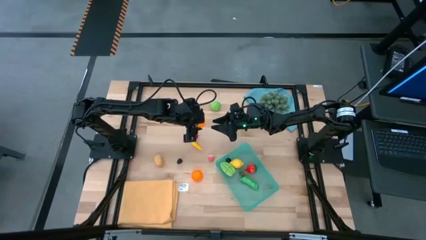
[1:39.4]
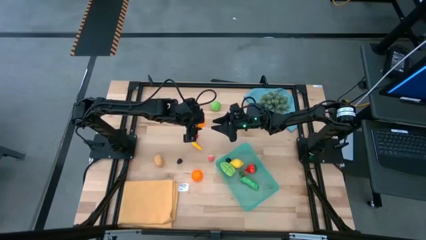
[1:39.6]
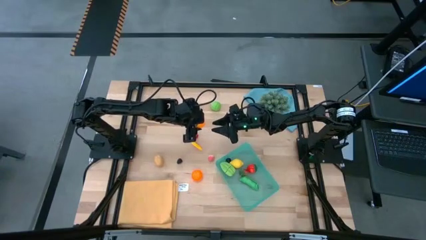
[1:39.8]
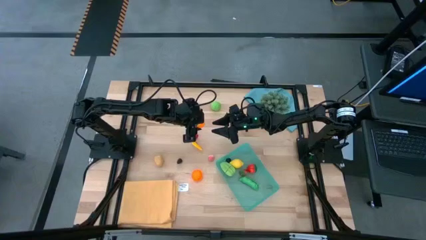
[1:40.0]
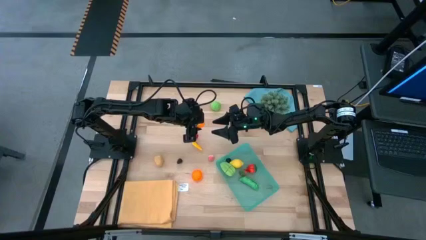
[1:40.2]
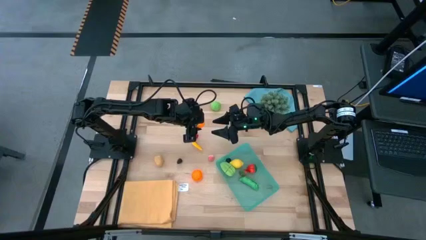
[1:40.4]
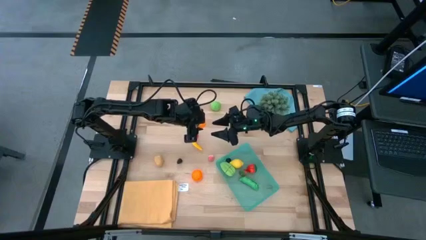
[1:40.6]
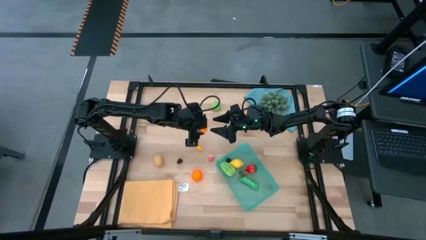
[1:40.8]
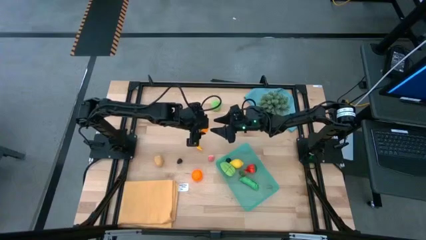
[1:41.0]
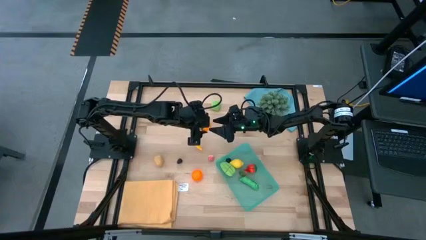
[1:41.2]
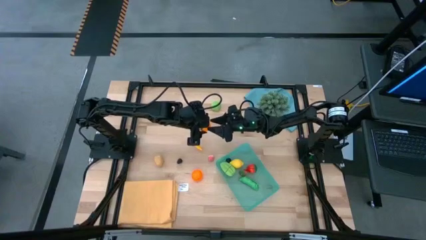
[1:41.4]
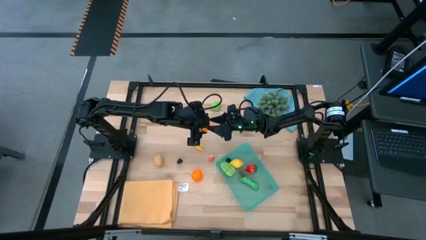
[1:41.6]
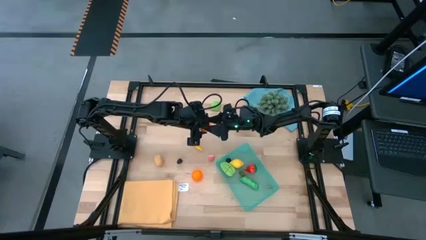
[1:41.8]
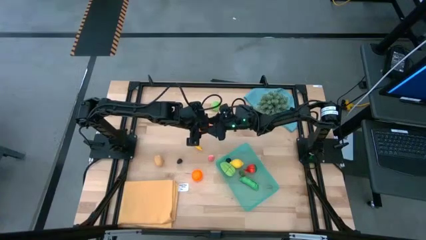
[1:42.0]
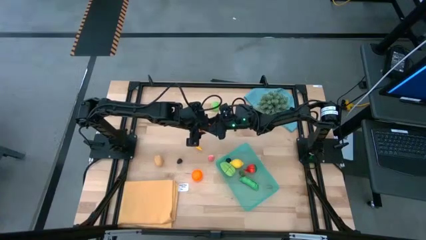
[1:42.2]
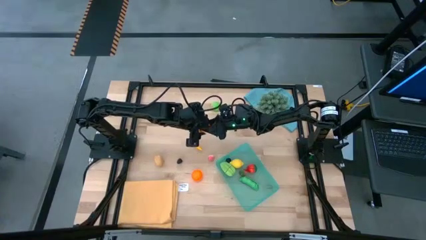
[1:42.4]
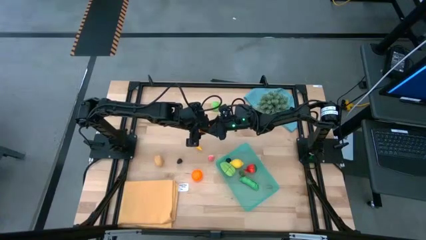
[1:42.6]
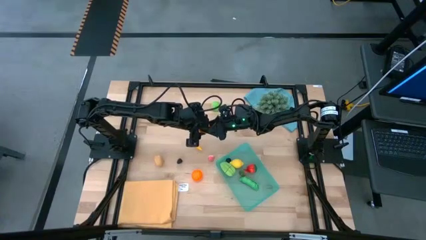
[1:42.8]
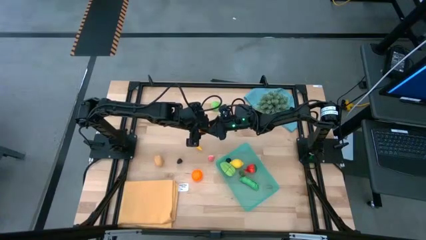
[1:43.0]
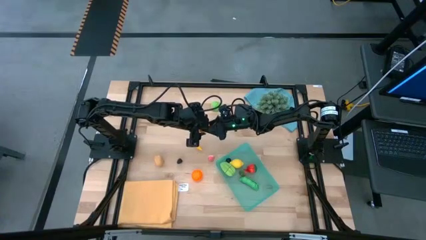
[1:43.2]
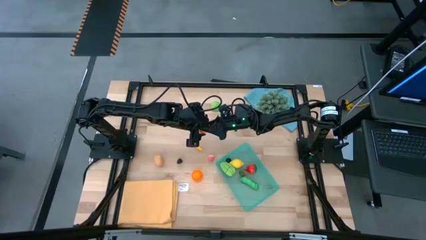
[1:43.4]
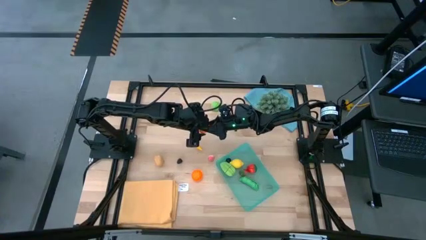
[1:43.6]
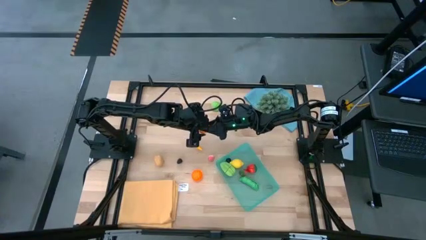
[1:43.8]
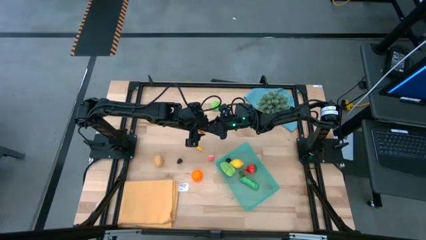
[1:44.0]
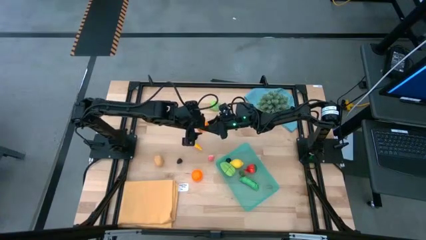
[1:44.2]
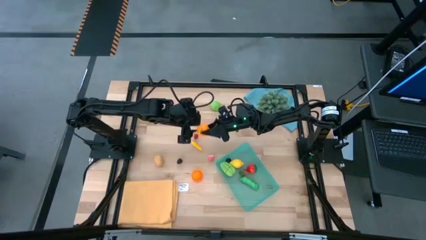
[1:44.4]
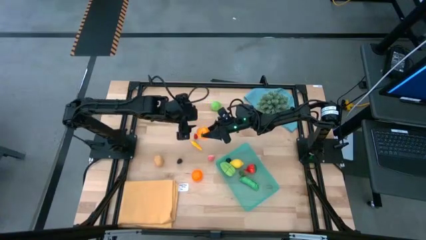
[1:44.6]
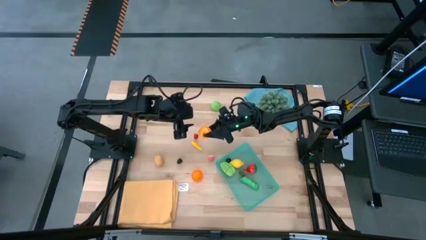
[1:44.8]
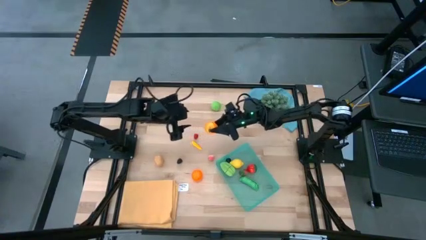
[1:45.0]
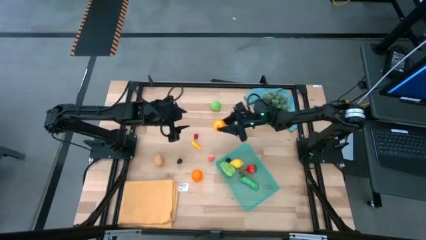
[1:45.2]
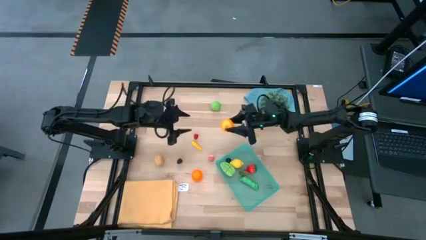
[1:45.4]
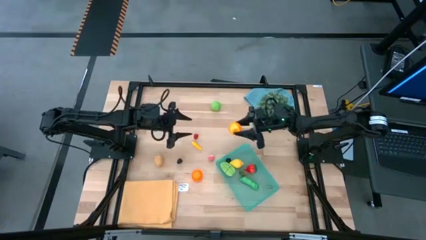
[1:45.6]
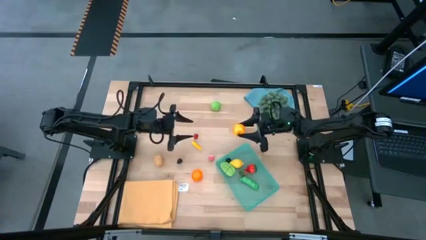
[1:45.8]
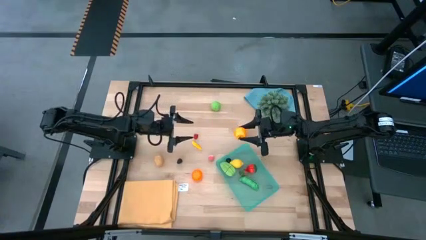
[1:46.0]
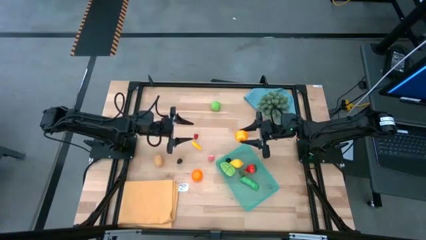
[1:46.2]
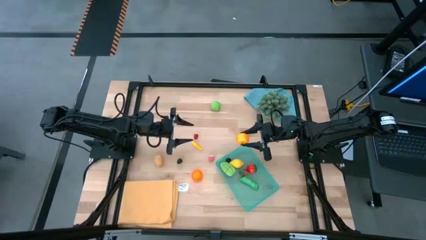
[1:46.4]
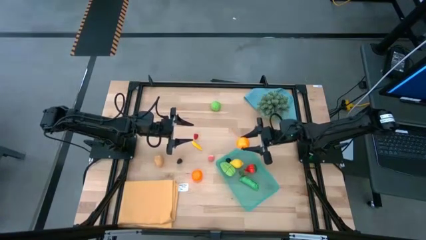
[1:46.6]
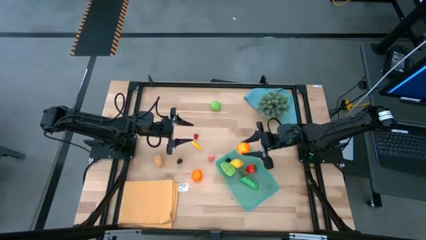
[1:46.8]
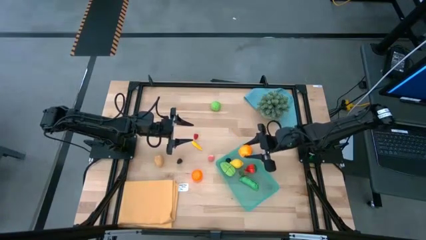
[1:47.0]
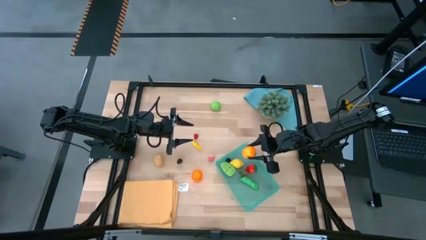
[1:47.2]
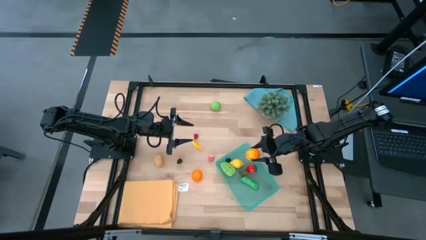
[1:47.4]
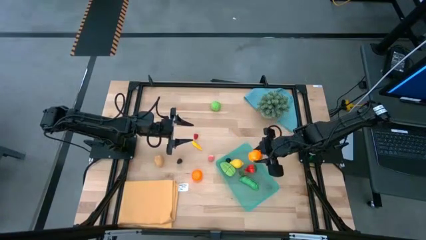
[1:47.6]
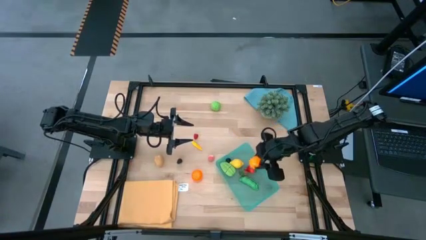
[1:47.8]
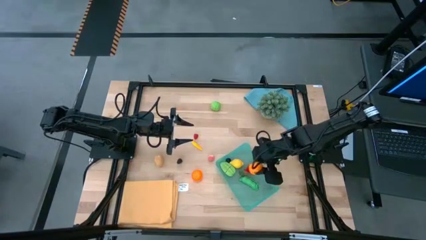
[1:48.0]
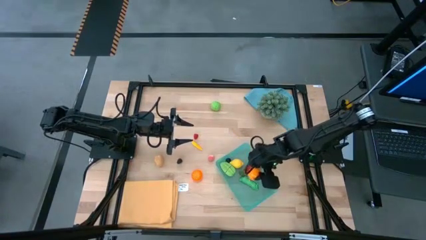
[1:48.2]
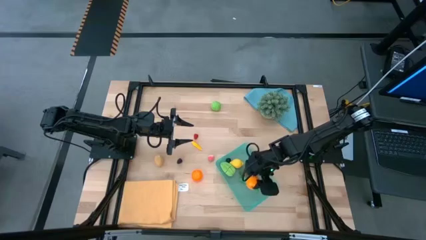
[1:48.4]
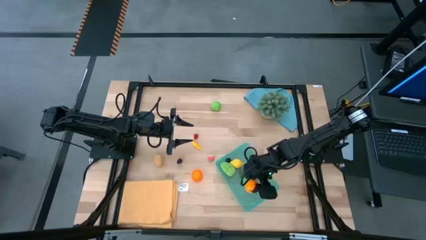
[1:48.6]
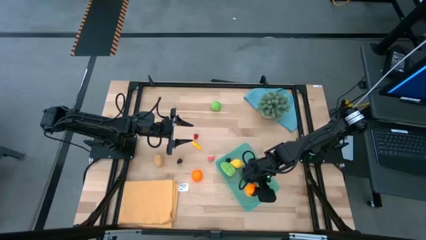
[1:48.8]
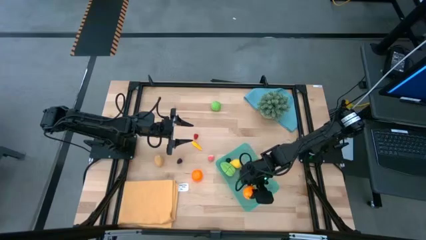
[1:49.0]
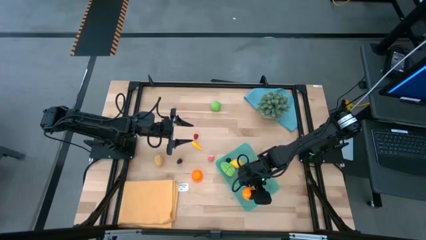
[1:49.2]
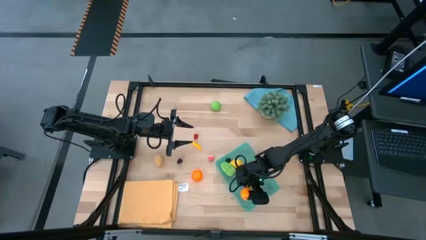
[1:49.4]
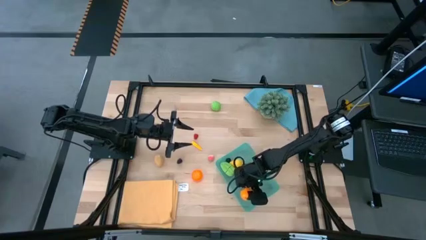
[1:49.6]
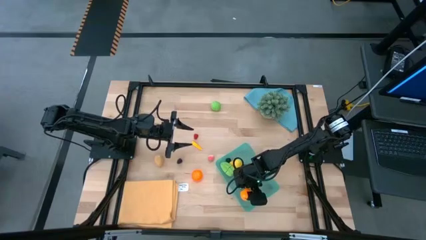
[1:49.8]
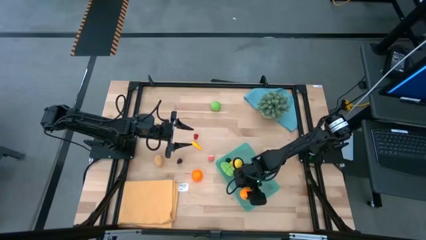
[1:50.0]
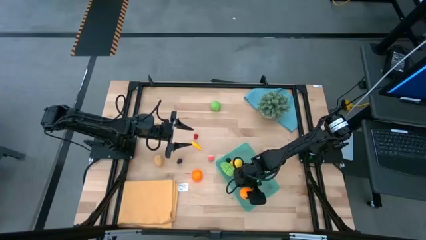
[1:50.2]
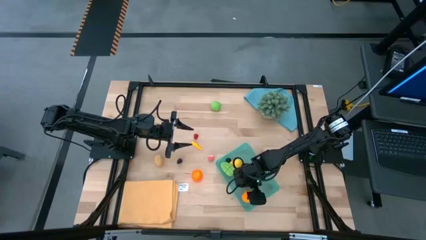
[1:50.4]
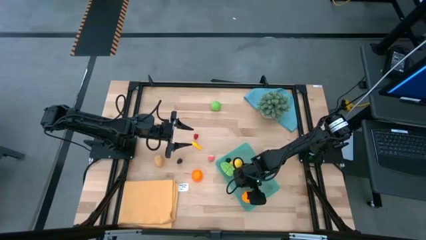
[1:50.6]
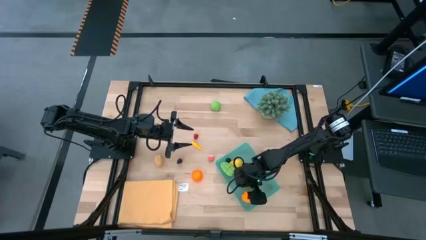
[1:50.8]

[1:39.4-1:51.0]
Task: Pick and placing Produce into tupperware
Put the orange into the green bin

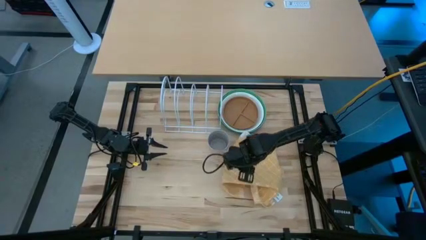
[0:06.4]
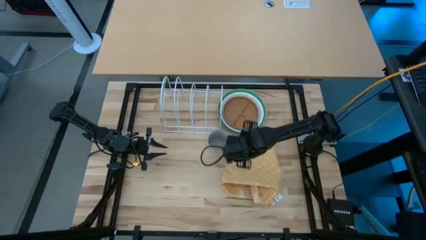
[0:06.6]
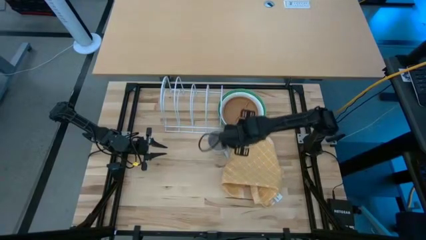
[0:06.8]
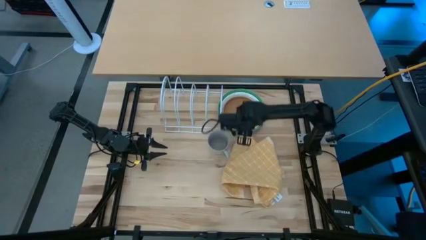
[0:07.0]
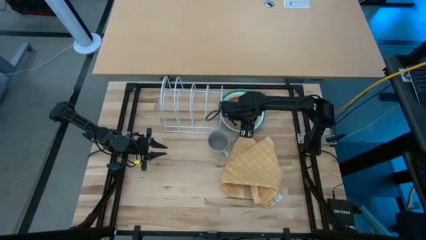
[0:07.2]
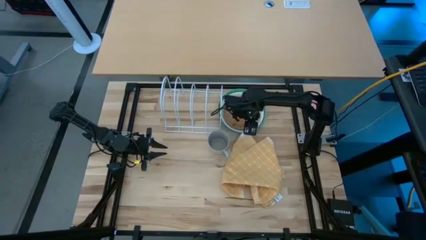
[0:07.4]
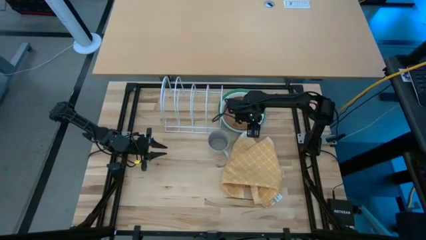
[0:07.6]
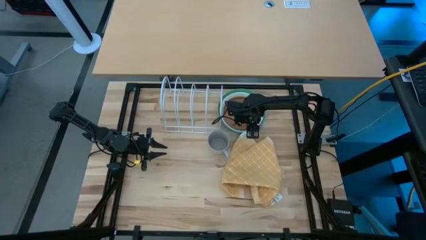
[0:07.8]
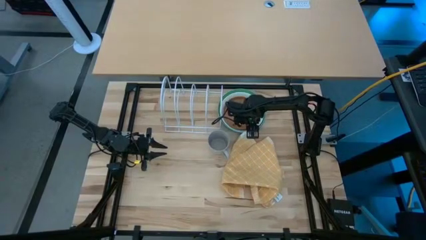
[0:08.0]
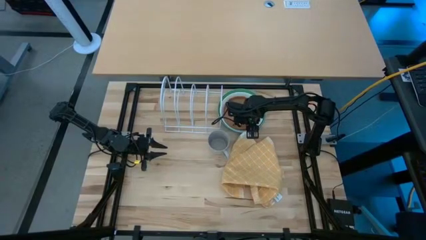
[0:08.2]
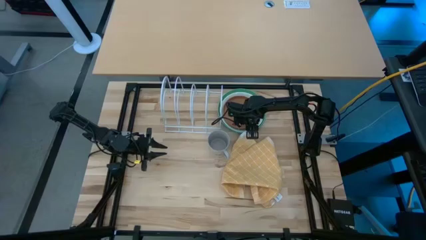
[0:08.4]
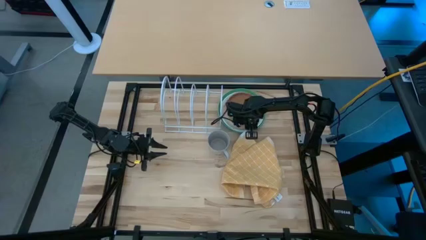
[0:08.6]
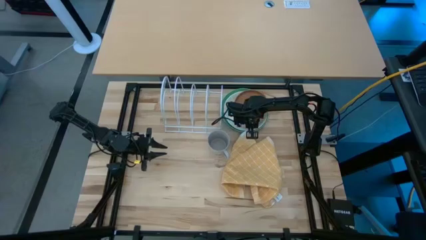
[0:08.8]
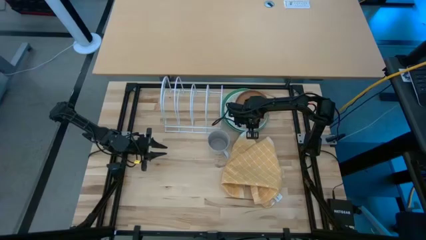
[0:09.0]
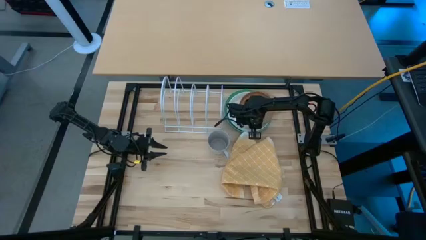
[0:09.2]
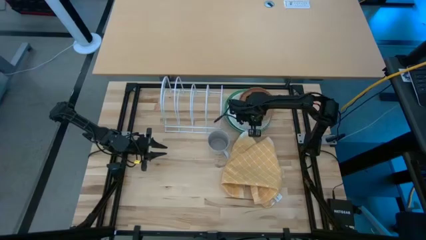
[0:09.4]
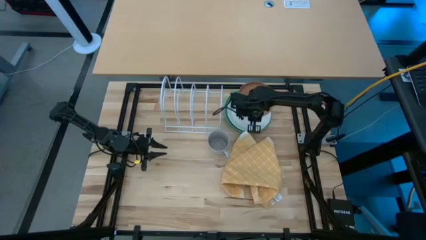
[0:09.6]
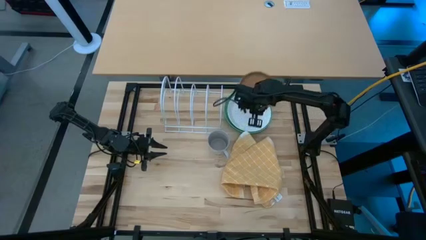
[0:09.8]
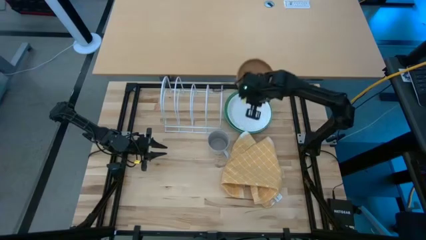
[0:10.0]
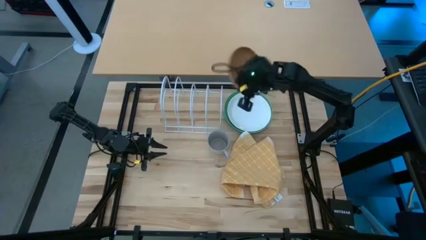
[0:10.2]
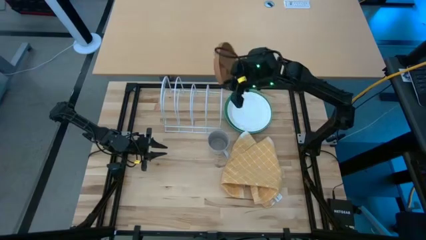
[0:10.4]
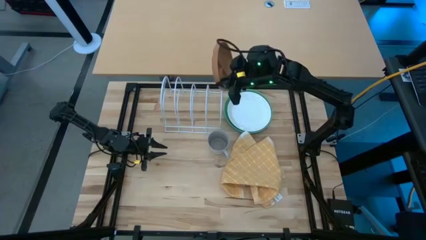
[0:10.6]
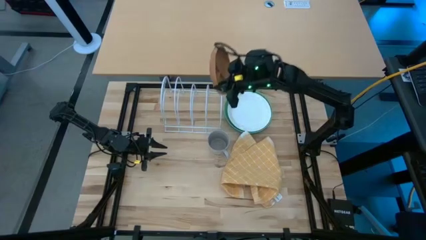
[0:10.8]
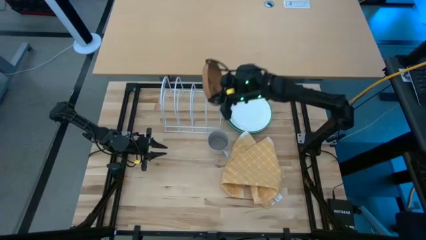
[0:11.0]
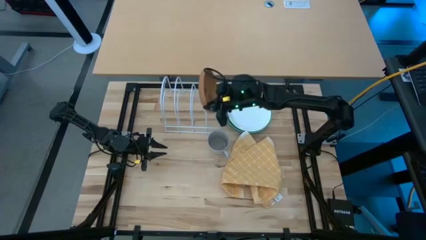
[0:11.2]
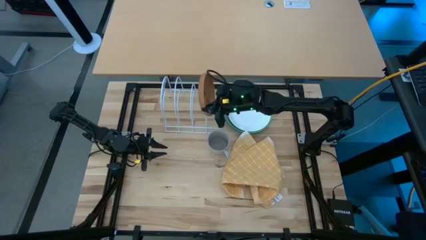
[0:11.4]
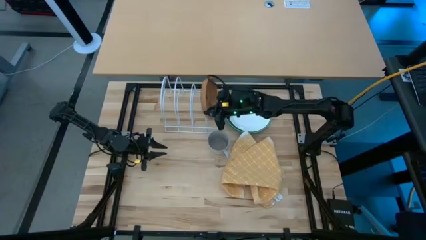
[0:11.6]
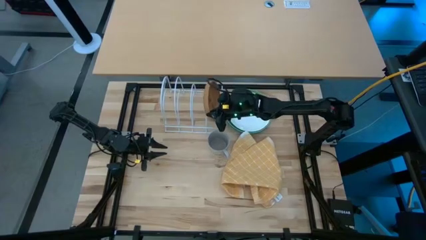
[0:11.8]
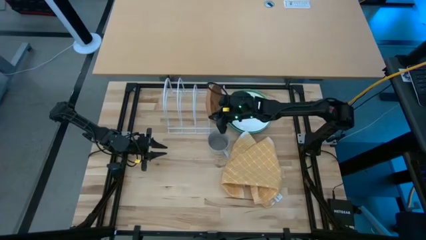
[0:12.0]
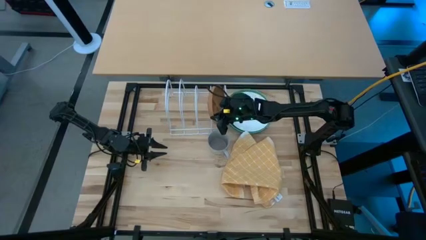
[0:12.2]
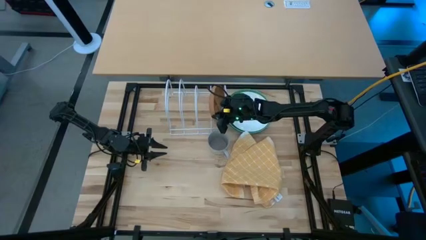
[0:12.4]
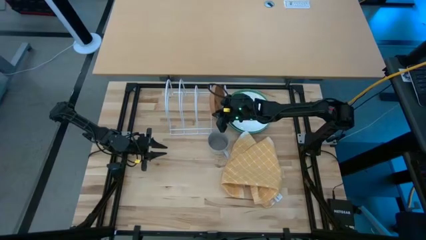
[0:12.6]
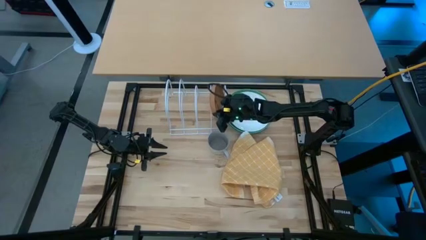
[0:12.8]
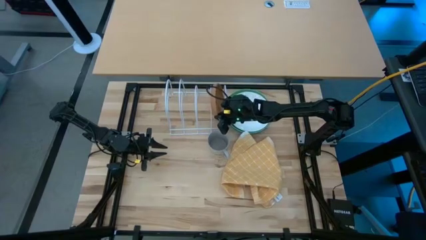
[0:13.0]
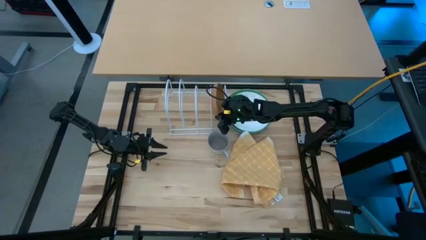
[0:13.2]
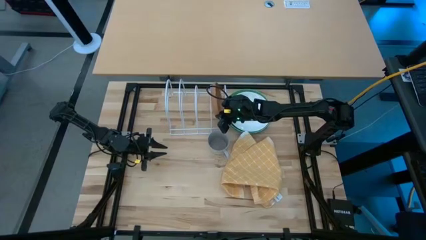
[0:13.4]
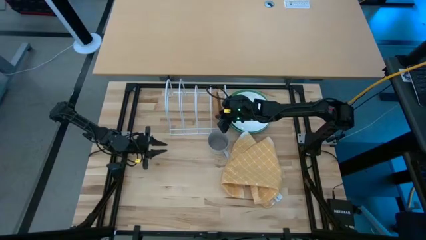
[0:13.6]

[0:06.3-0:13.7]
Task: Sort dishes
Put the brown plate in the dish rack
